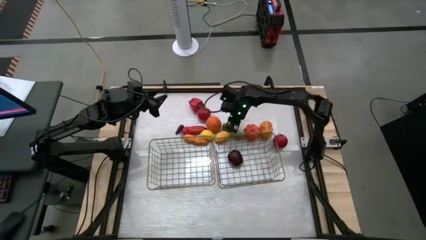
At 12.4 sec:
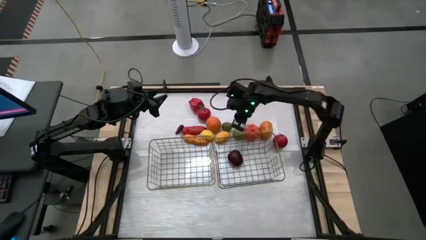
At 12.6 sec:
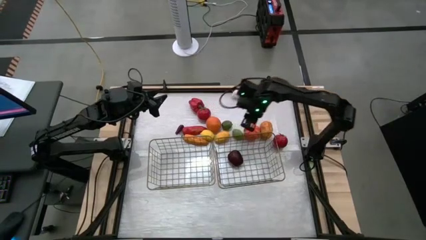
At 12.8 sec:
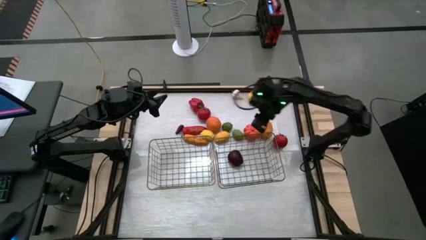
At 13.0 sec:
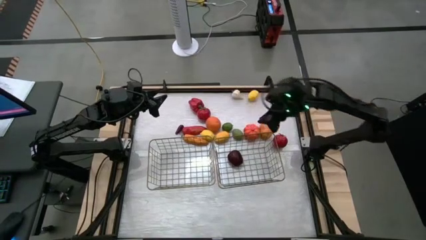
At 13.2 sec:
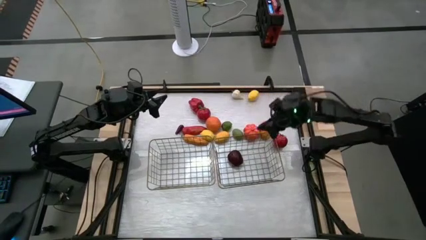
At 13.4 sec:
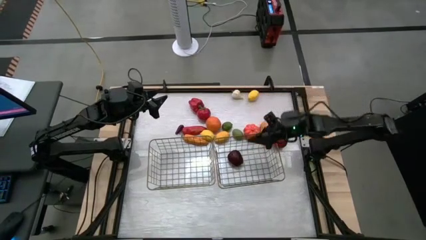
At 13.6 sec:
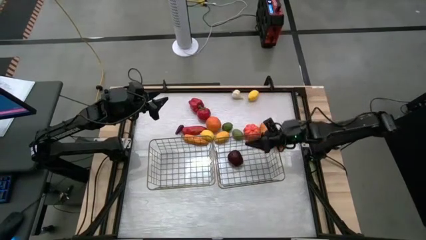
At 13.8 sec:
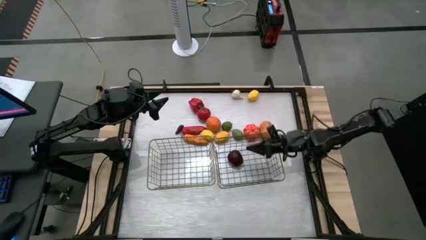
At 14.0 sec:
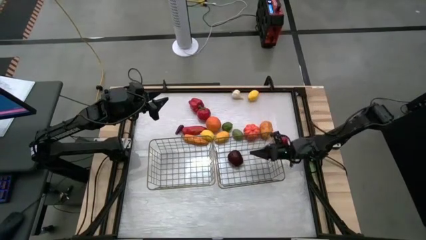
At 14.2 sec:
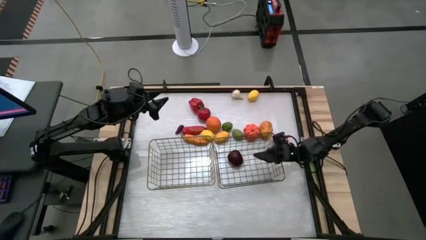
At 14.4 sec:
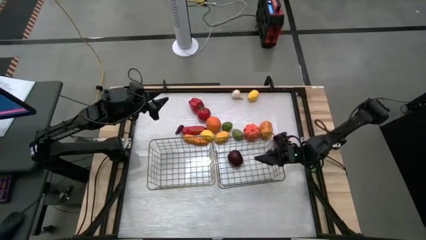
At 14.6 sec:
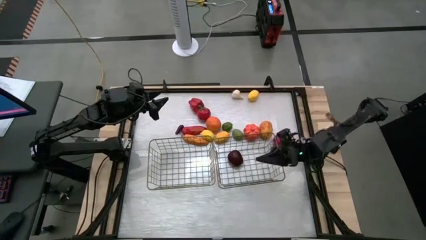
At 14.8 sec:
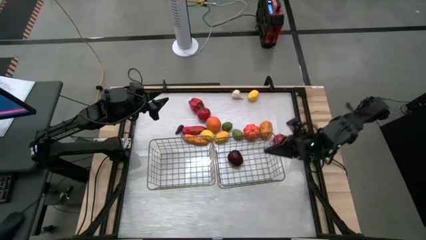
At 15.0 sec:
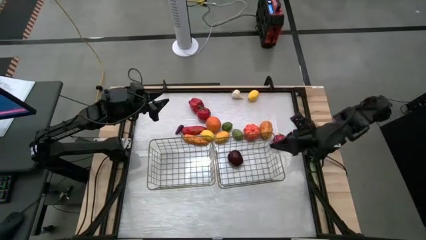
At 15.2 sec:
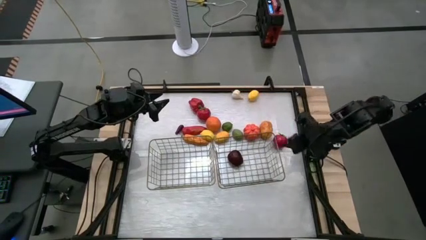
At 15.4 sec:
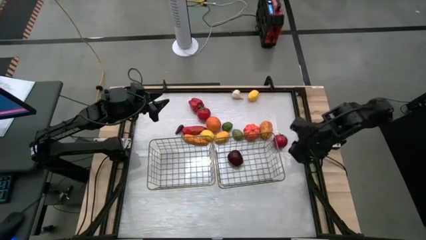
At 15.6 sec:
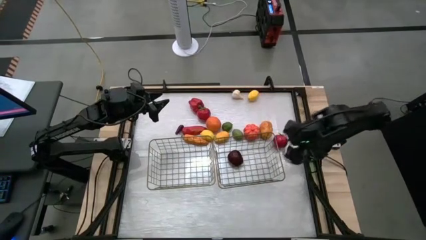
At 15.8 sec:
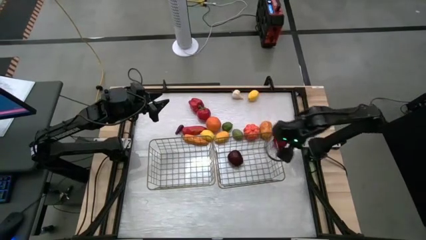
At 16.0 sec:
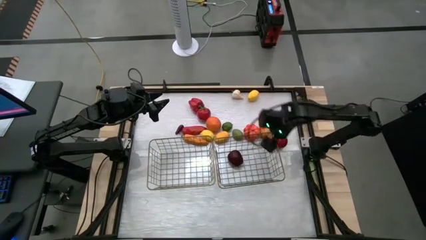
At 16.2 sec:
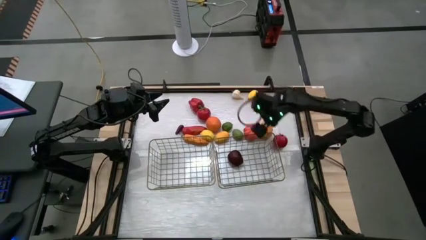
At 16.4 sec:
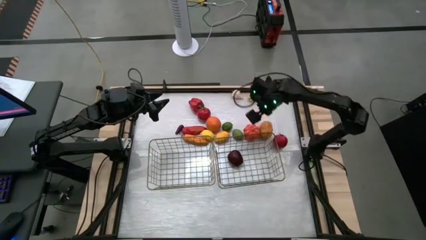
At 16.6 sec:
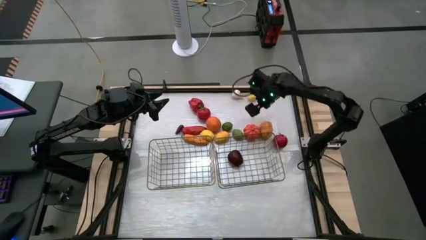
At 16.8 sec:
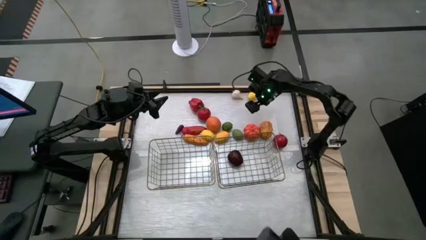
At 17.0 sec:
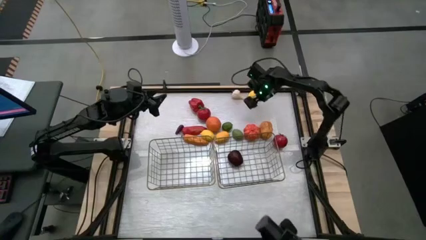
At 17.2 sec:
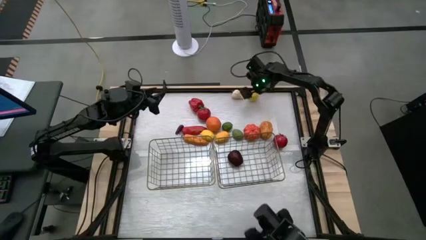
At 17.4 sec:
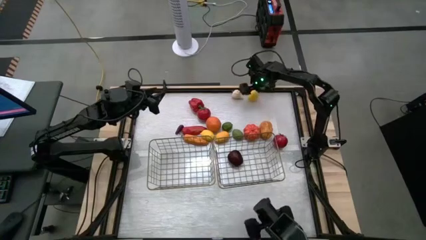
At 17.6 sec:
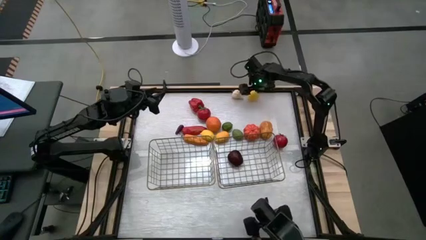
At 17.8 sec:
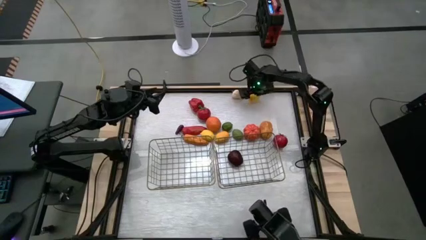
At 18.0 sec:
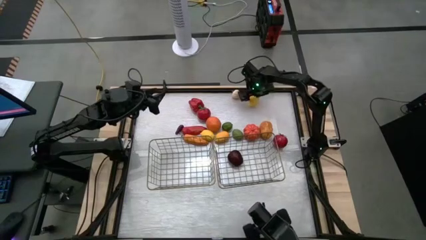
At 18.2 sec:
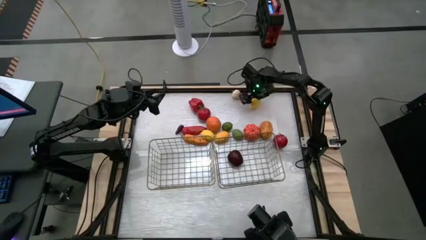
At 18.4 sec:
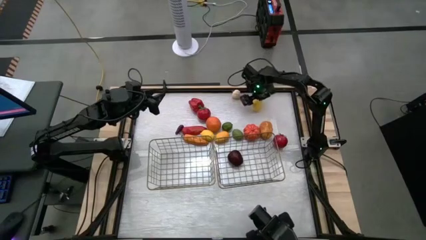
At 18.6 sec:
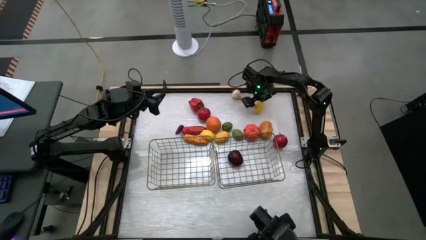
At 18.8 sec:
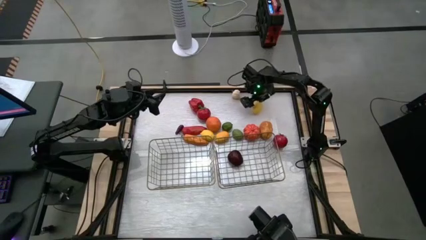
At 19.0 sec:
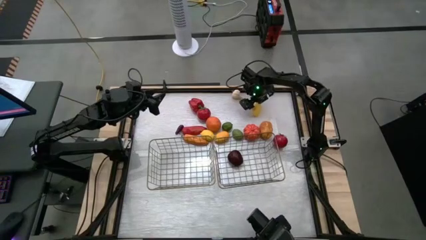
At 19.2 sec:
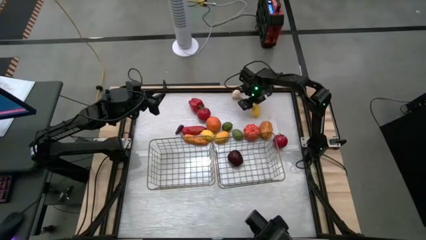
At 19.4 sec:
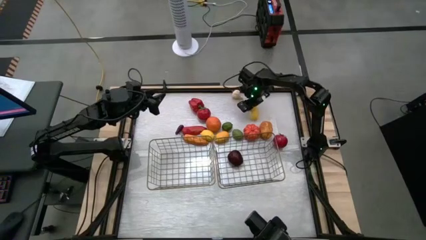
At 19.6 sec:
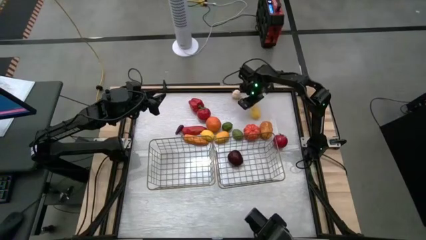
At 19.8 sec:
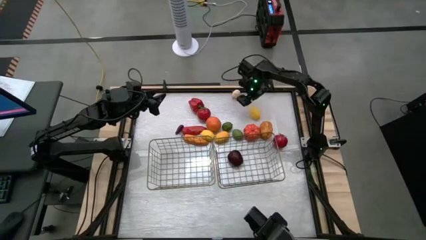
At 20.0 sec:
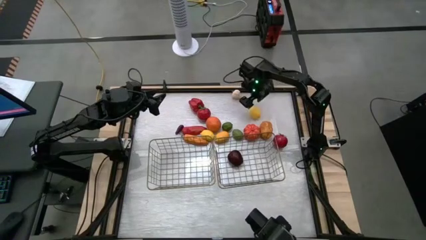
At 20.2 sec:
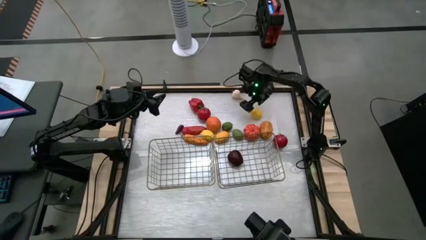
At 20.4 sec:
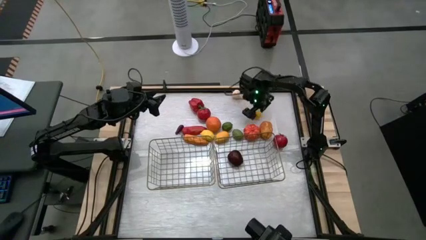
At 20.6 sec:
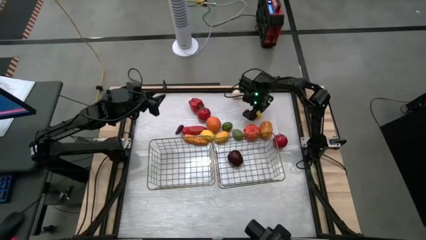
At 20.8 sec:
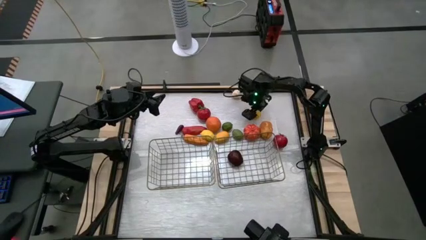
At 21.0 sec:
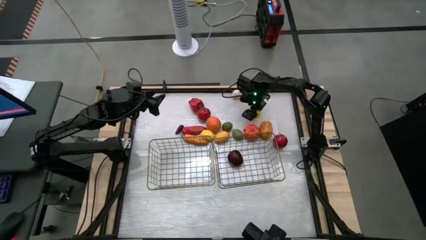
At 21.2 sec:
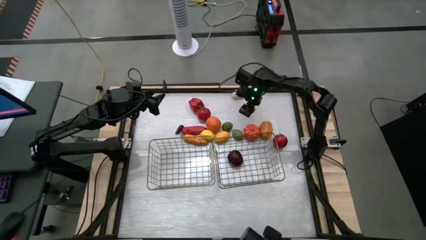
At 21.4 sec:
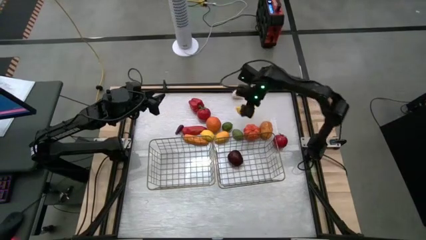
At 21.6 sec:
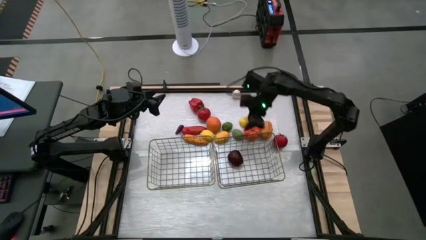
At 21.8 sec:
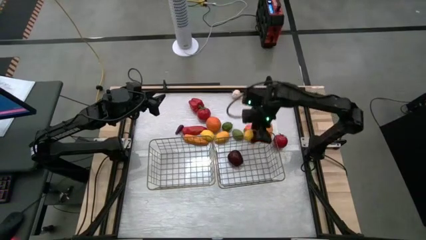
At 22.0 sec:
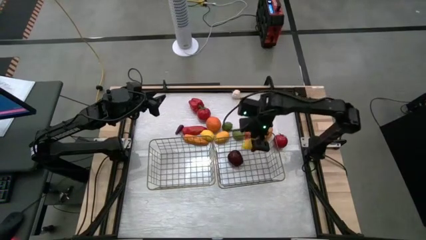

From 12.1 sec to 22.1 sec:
Task: Sort produce into baskets
Put the top lemon into the right wire basket

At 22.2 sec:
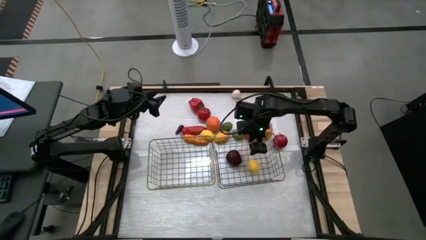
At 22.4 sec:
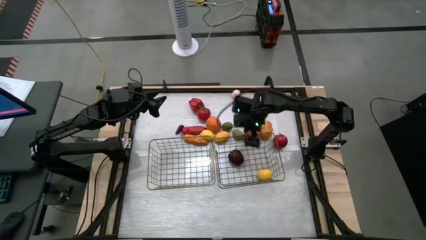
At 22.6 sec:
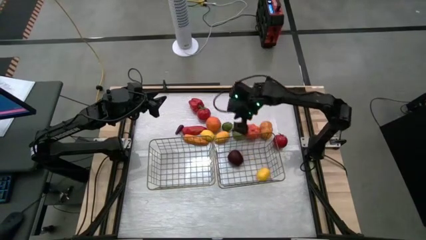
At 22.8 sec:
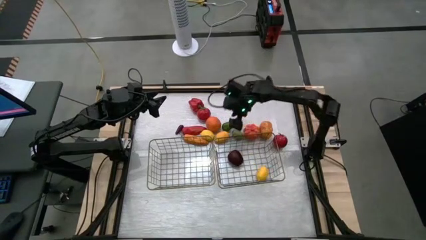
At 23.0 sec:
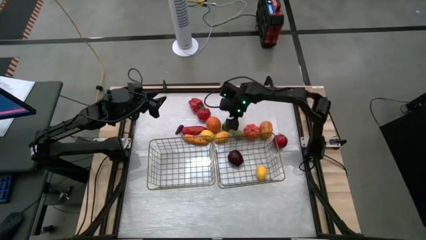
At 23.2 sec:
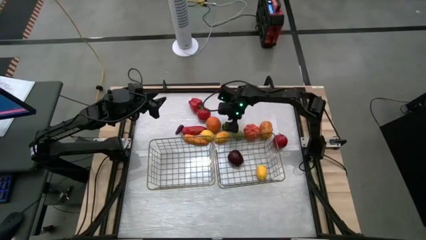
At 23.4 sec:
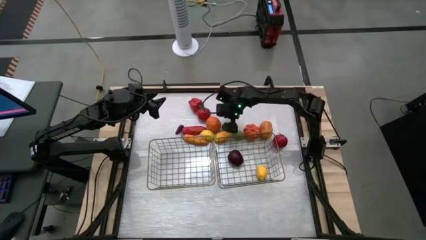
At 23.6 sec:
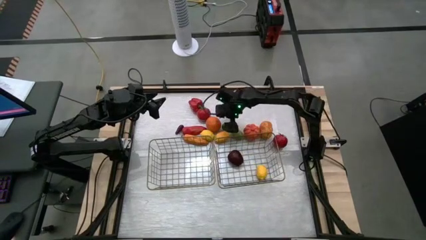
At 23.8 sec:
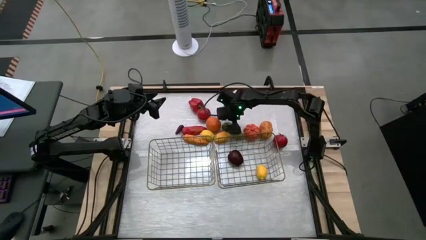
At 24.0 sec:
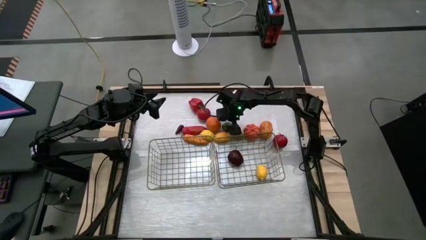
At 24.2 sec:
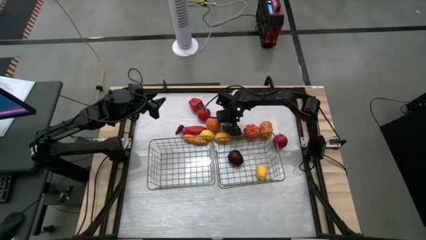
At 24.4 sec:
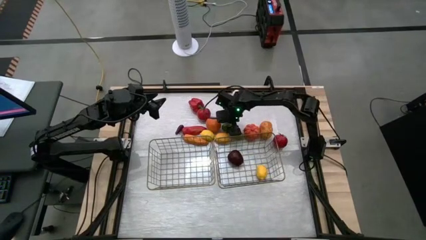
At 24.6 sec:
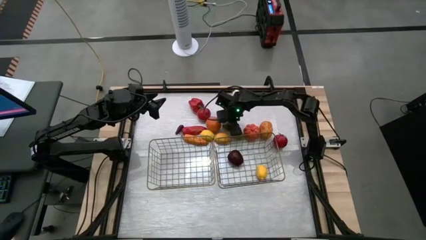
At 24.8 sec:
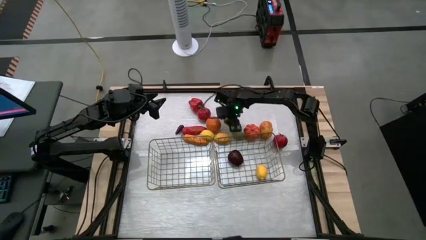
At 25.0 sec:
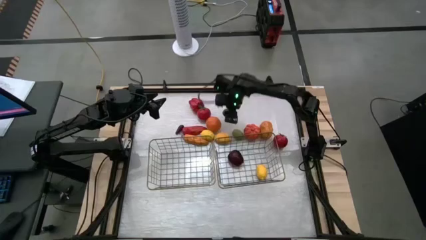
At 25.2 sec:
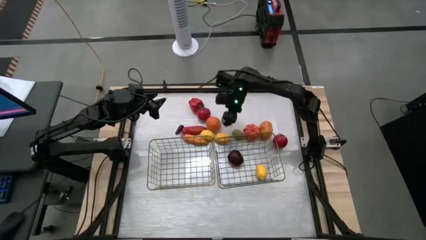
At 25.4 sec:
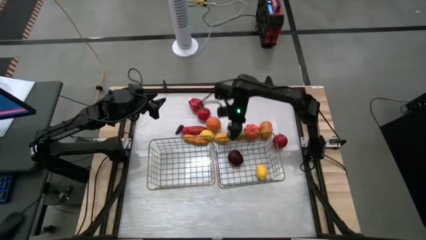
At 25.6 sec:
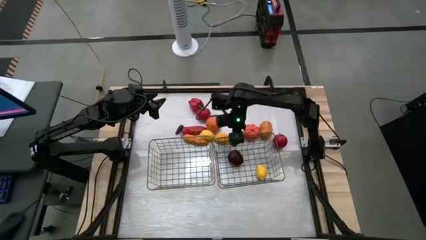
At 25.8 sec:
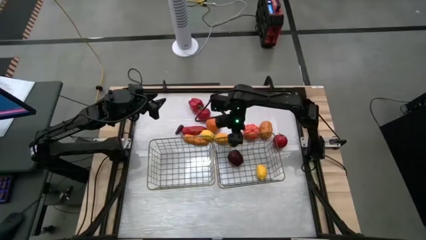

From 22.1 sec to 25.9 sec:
Put the top lime into the right wire basket

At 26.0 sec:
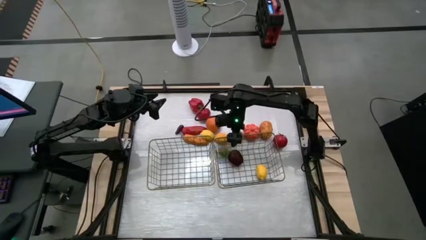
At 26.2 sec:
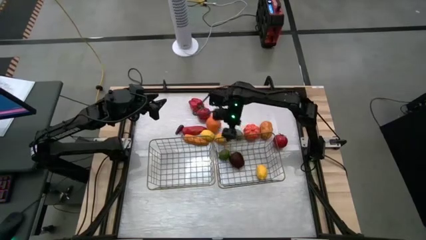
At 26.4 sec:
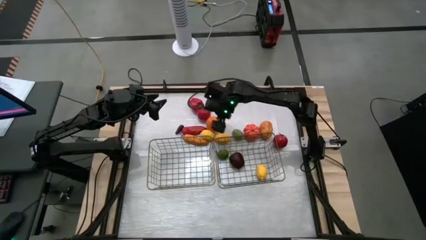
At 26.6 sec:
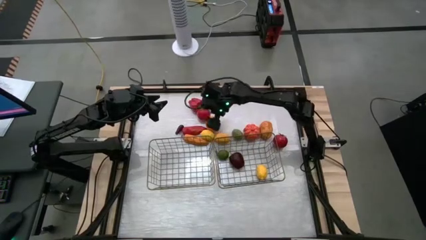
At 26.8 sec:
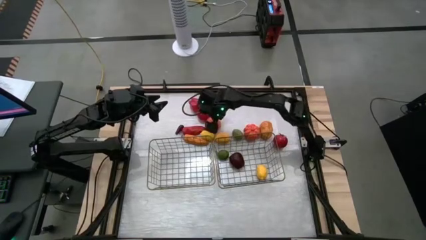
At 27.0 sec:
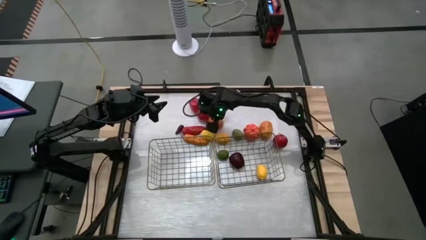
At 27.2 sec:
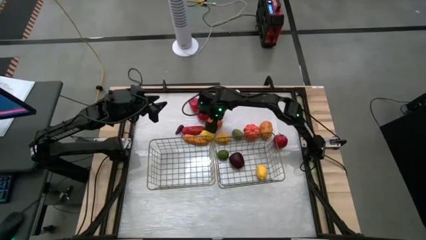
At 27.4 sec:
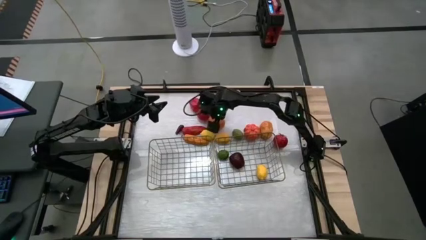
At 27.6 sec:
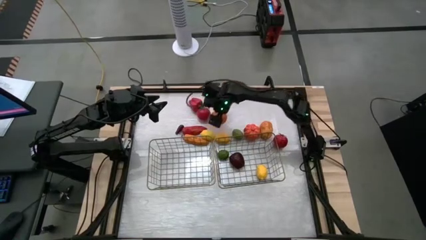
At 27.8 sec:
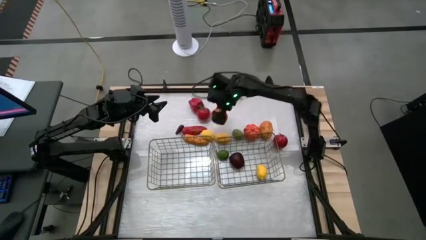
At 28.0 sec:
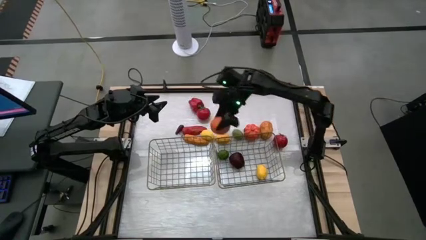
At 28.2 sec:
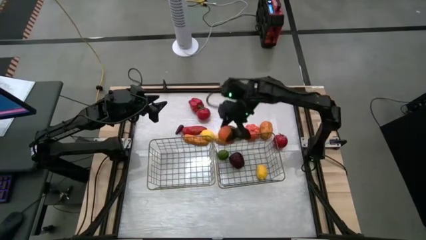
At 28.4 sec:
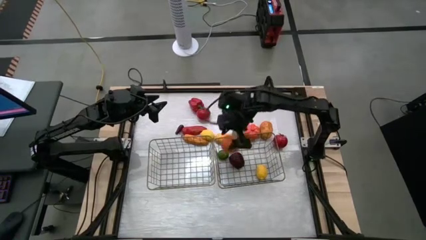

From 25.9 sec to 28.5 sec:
Put the orange into the right wire basket
